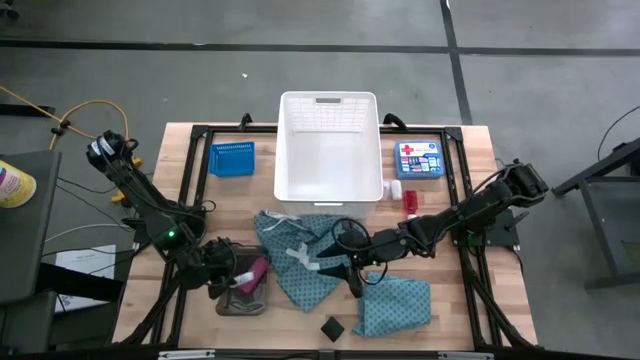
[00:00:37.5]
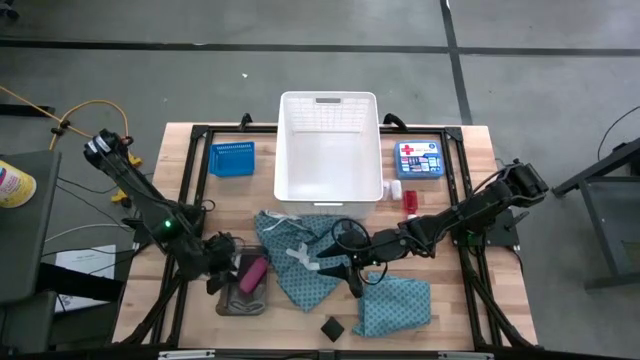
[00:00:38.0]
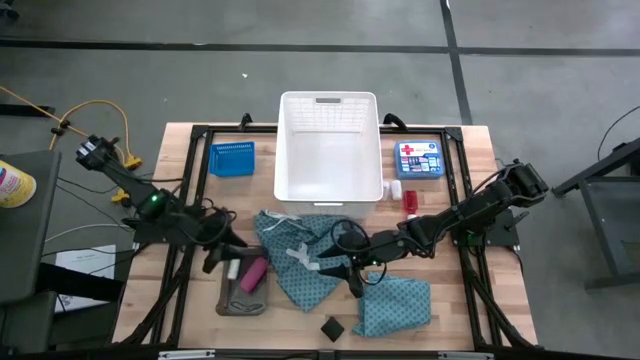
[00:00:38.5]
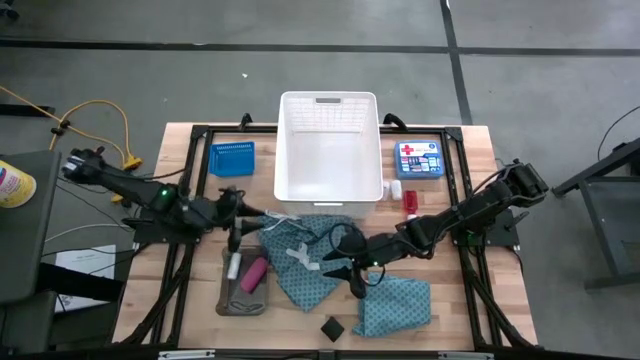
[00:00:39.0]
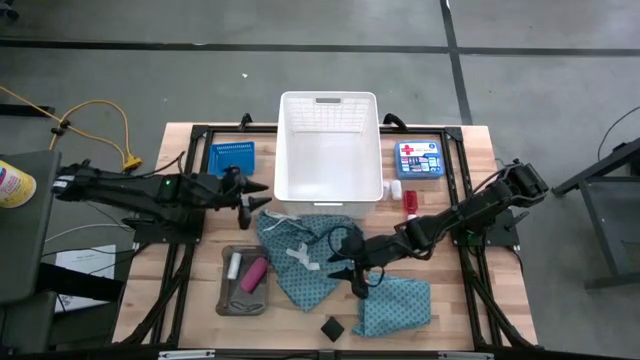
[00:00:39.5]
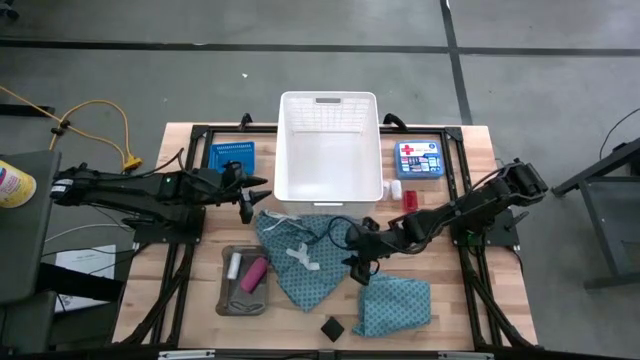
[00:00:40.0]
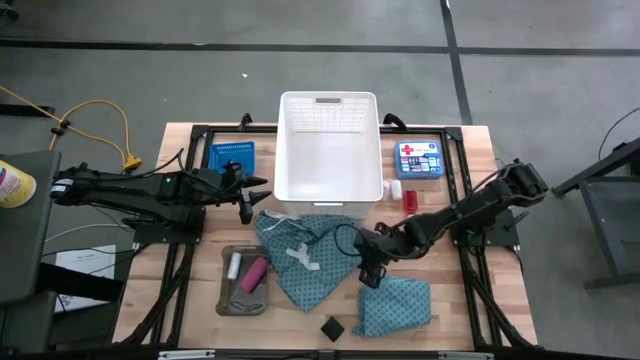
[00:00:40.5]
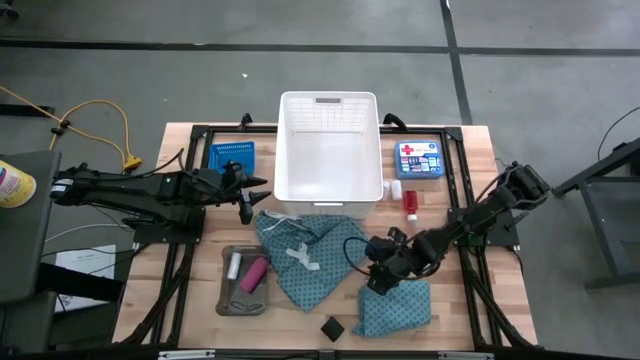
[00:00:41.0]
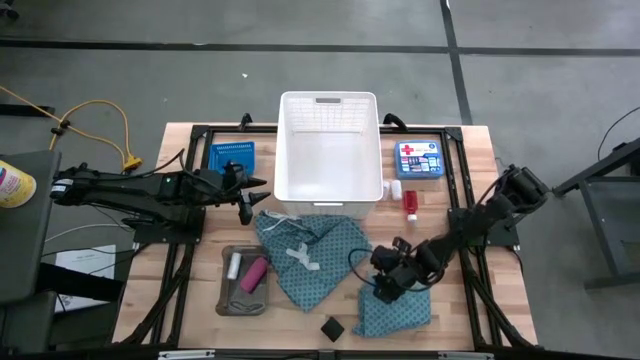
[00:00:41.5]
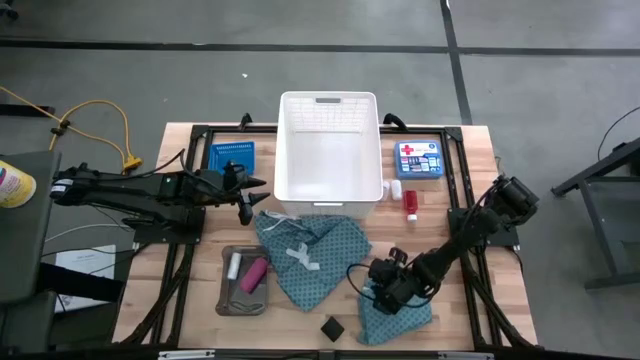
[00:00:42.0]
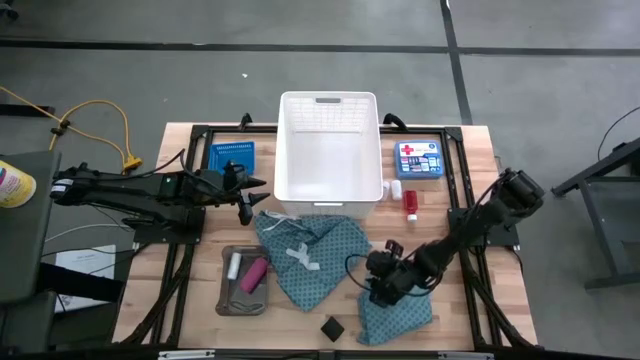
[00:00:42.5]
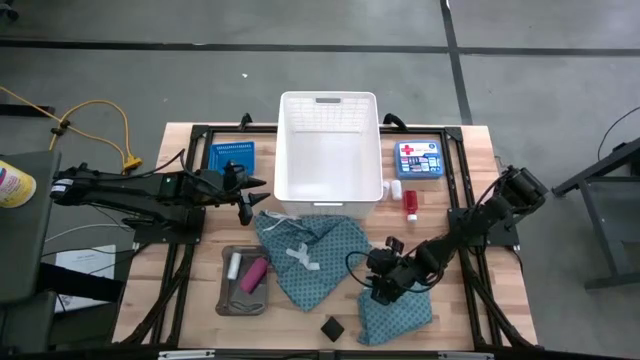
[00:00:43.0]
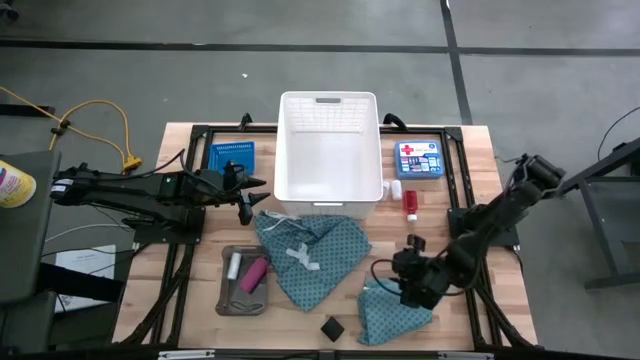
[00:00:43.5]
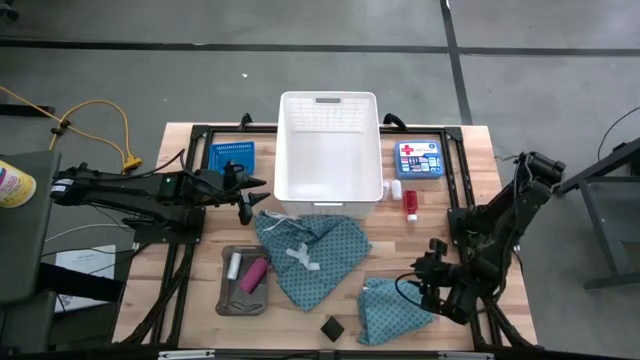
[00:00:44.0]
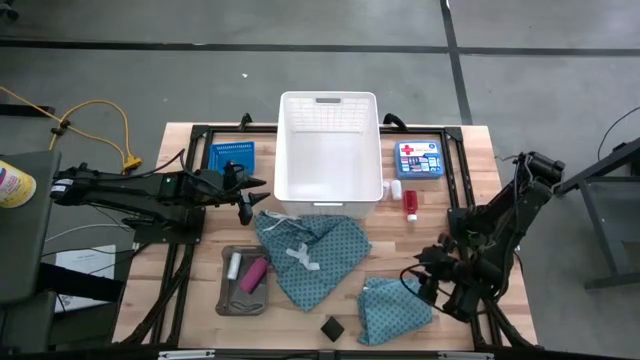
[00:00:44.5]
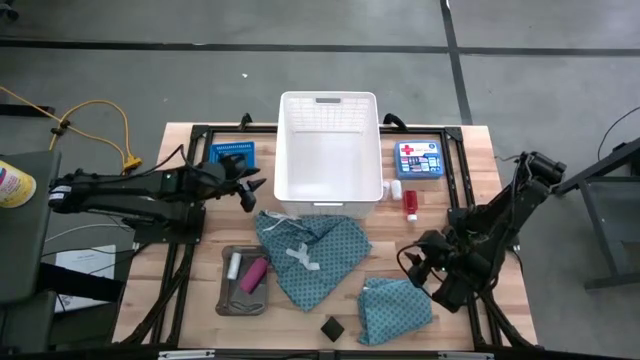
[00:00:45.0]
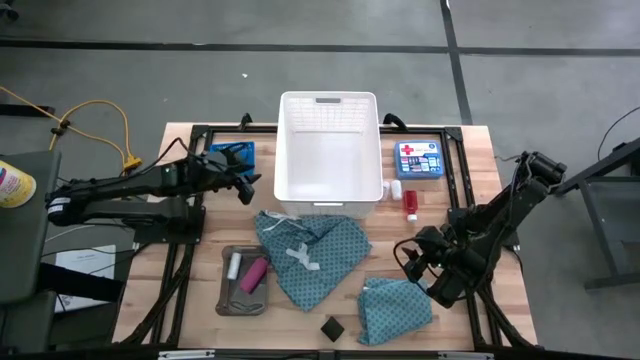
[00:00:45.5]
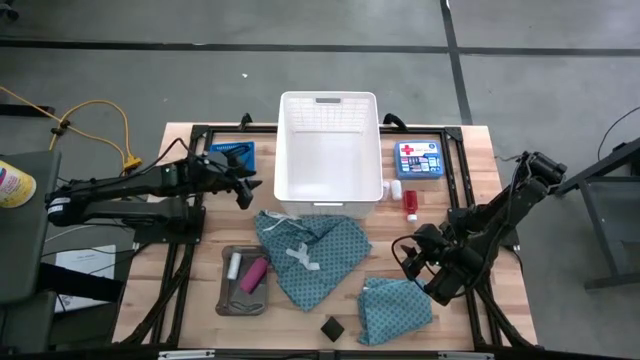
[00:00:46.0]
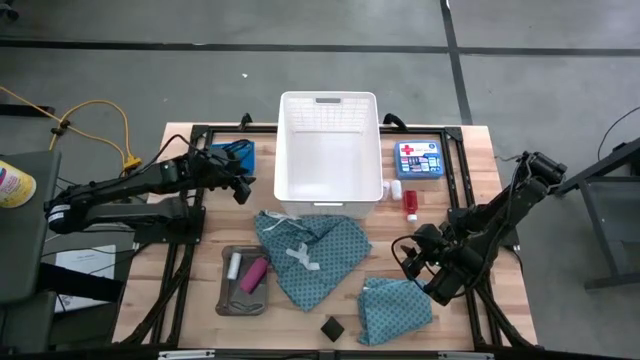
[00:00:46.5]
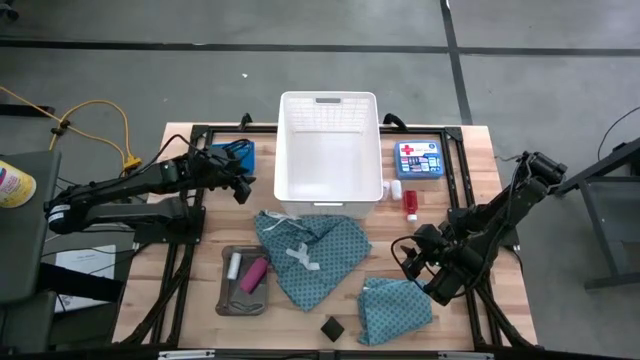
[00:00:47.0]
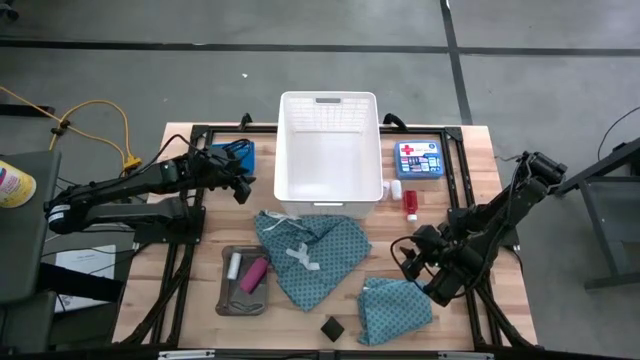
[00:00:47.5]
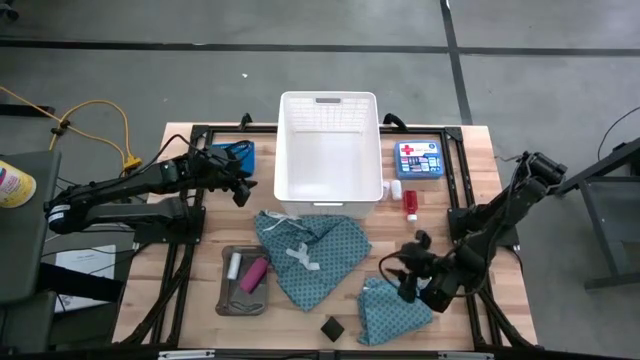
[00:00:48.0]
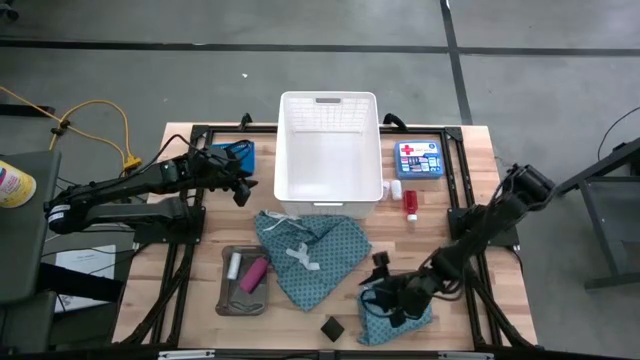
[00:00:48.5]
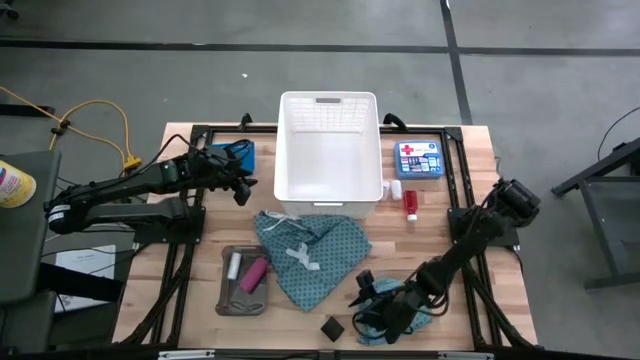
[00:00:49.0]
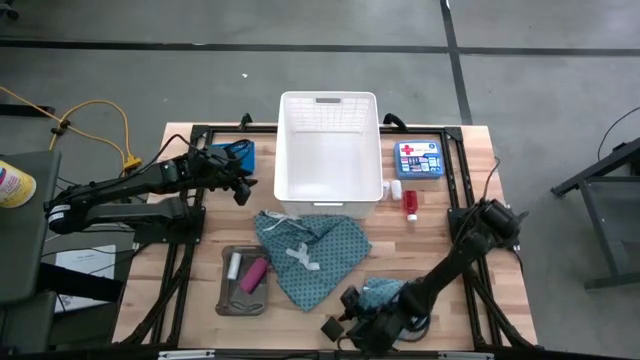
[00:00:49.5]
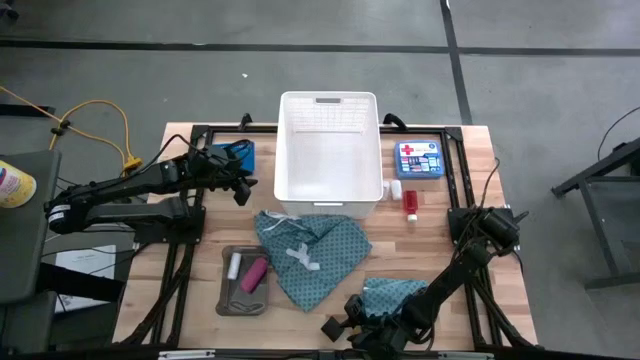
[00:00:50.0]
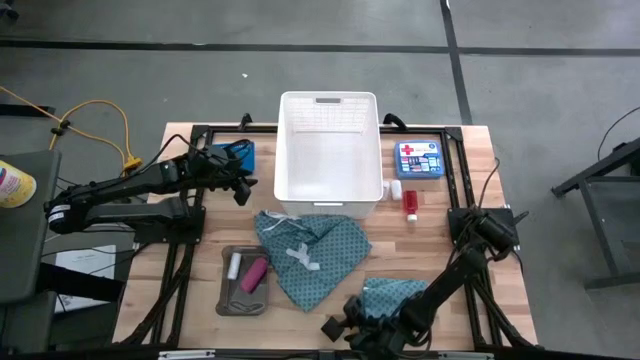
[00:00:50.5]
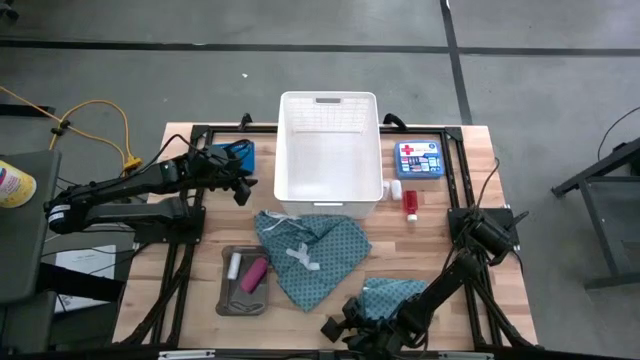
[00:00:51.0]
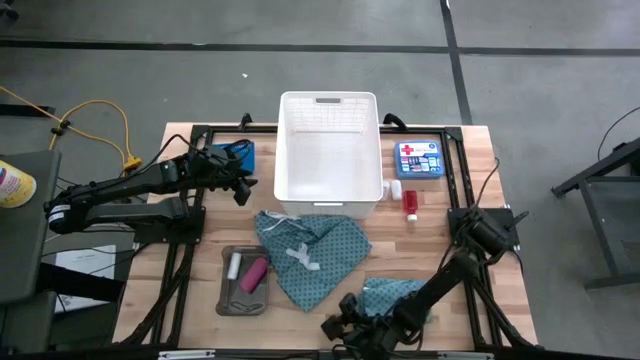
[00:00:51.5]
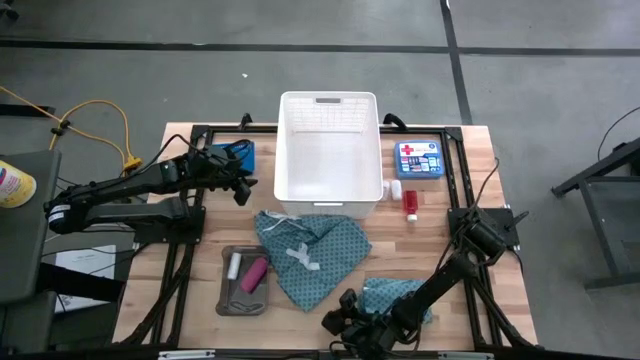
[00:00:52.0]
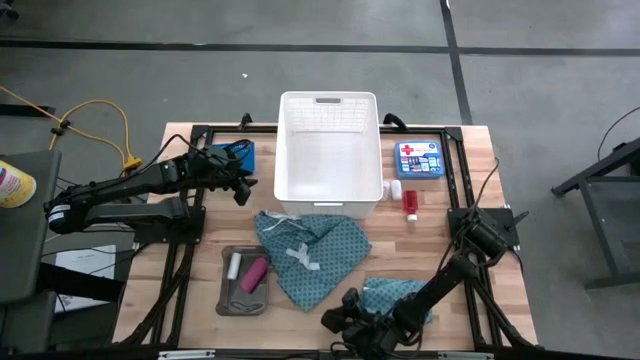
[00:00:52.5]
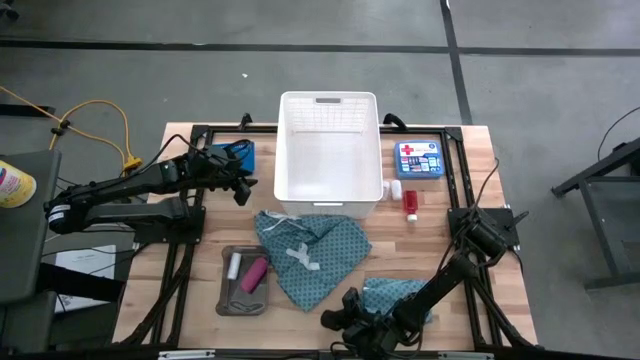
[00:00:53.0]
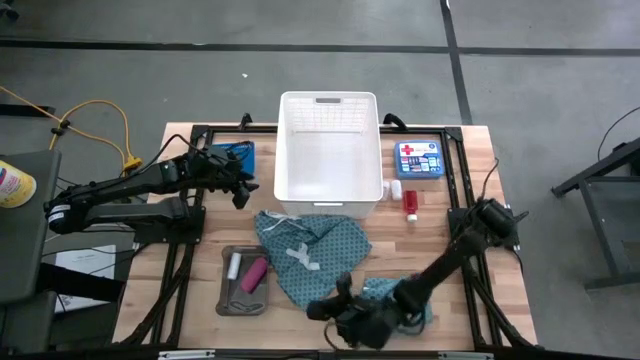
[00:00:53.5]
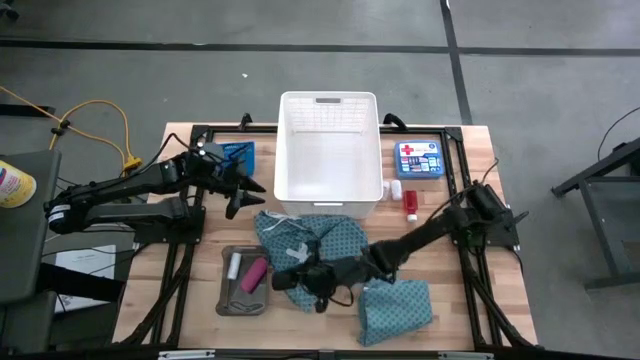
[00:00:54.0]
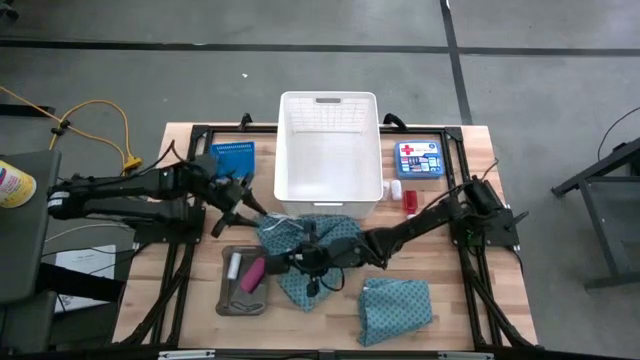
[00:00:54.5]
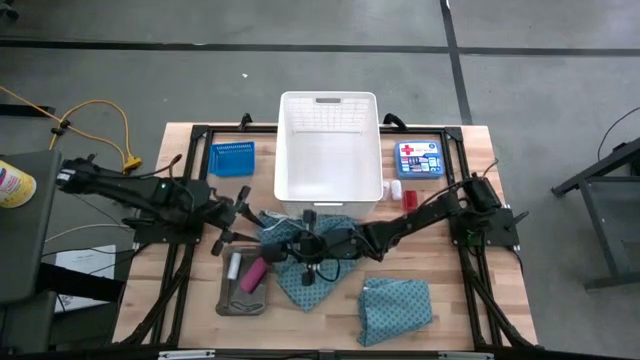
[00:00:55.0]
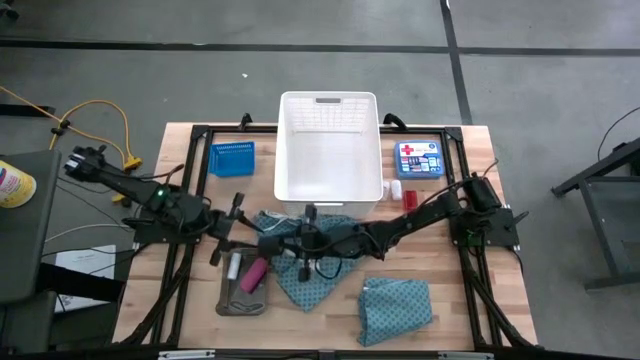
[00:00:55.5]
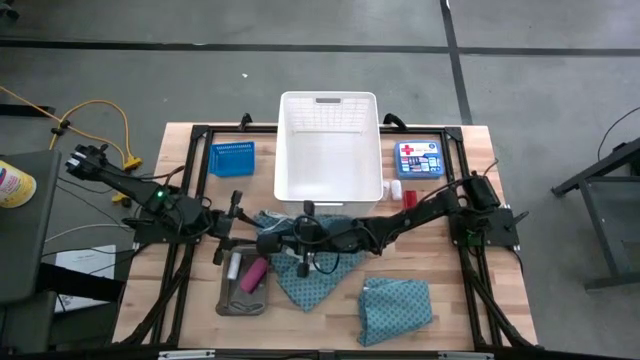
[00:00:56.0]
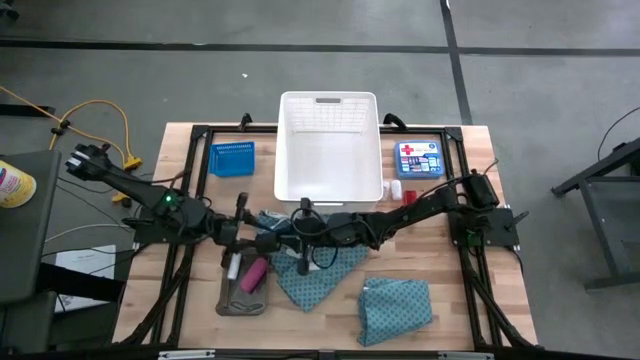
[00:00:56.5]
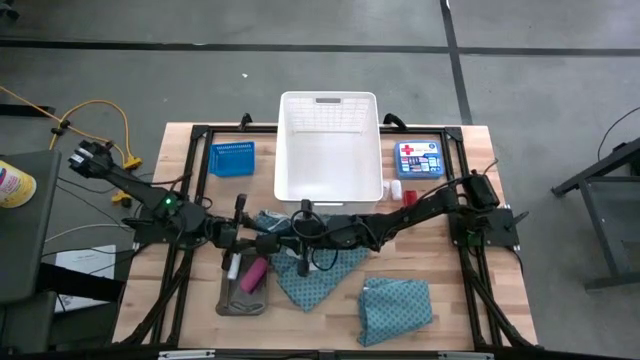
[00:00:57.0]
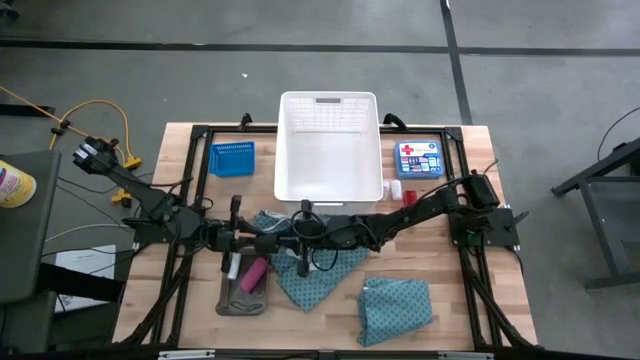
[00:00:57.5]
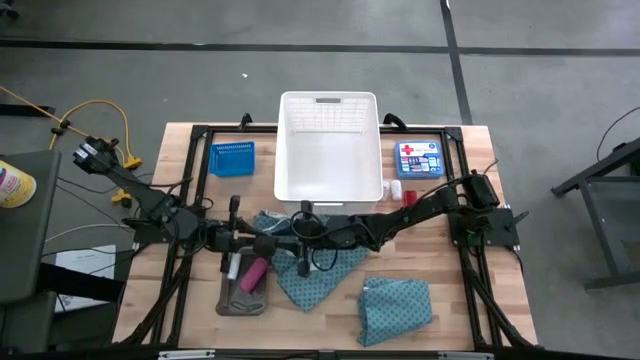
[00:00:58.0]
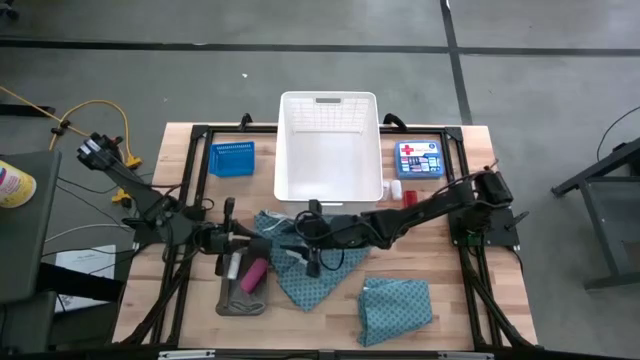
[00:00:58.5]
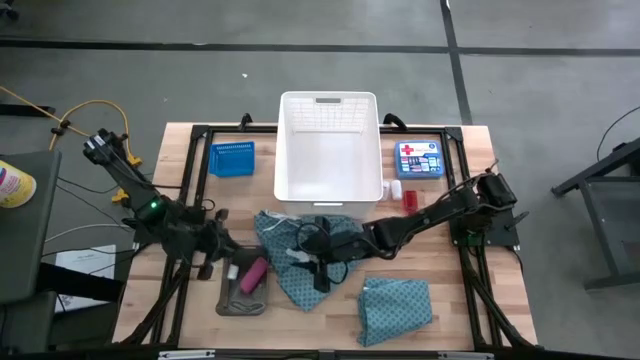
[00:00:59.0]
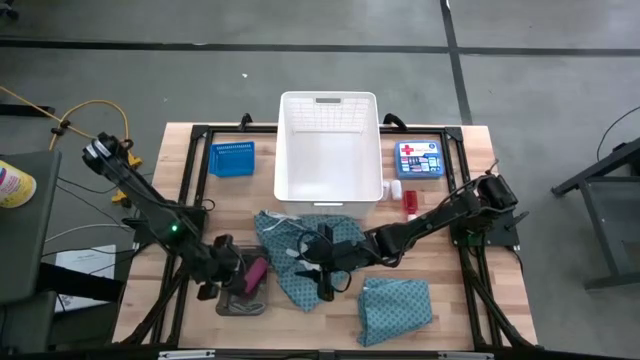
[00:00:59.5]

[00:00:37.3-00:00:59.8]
Task: Pick & place medical supplies in basket/bin
Put the black bandage into the black bin
